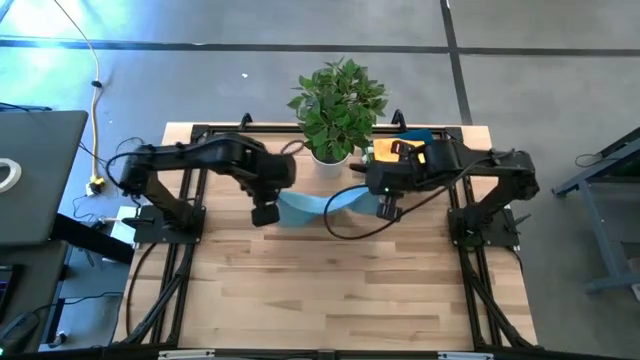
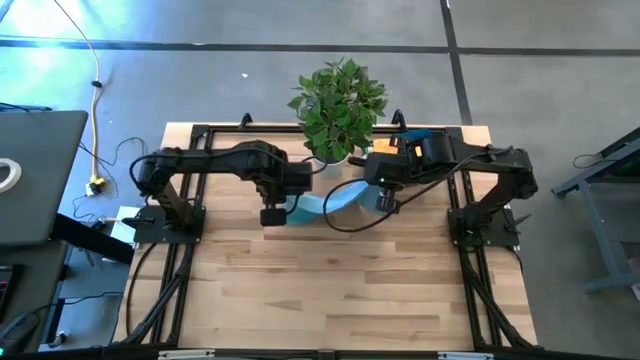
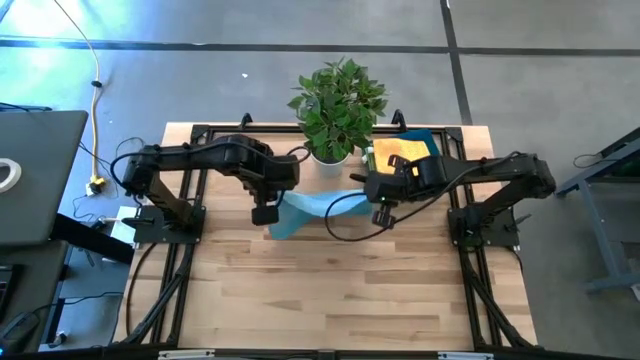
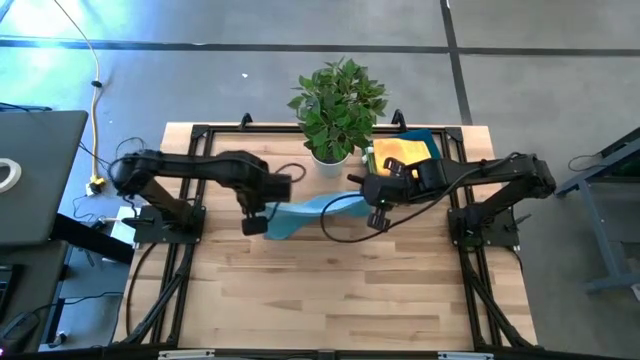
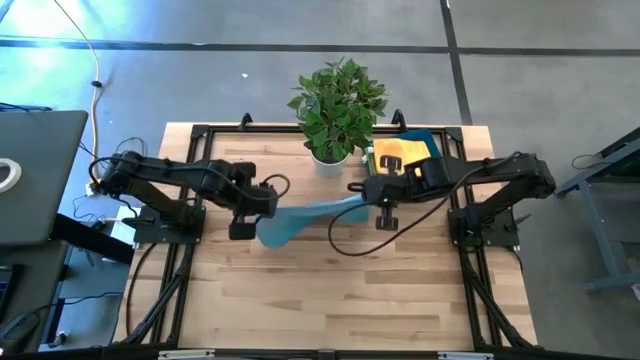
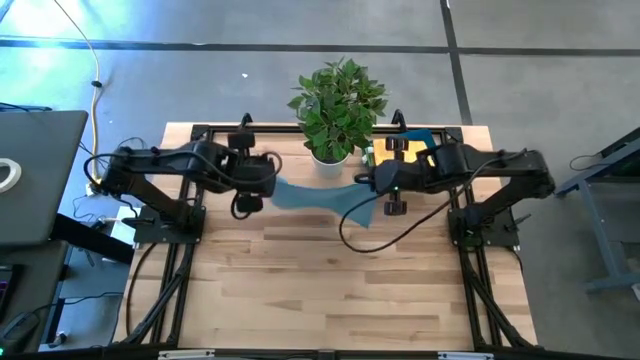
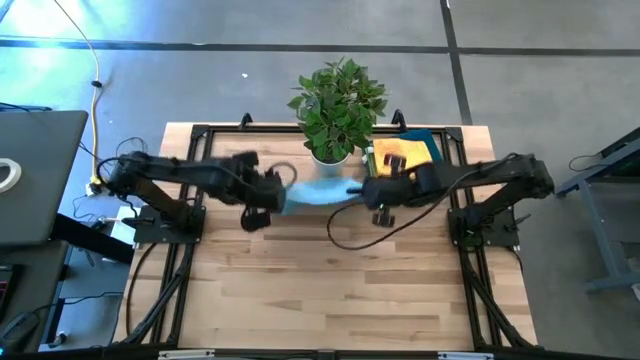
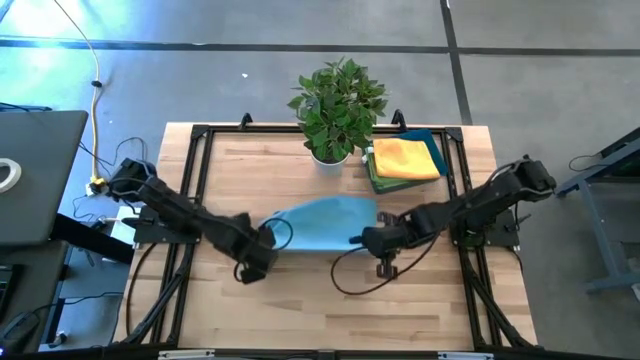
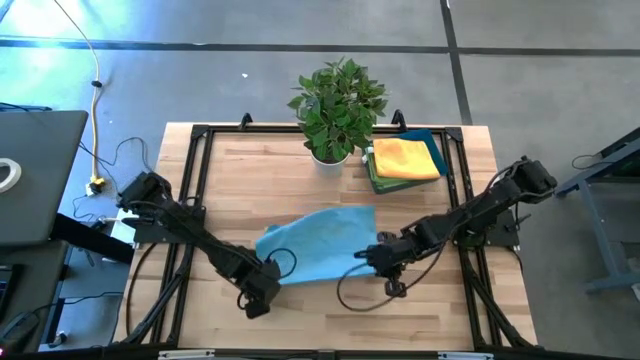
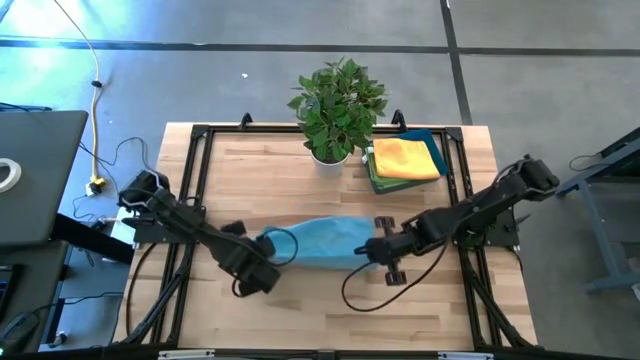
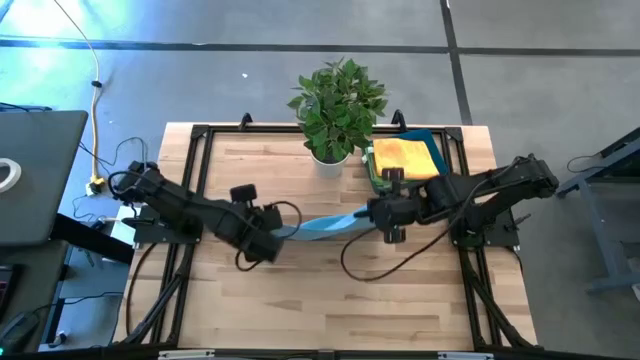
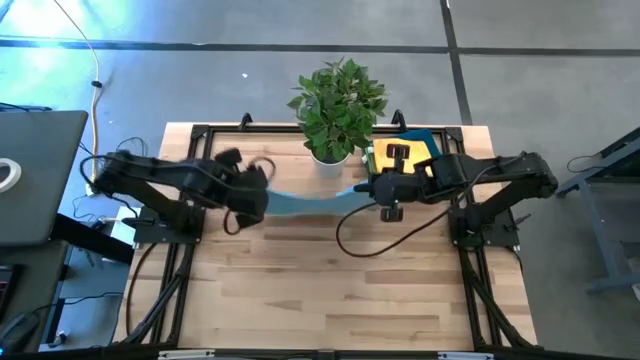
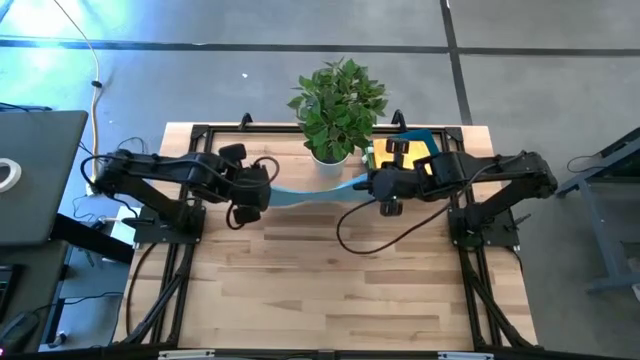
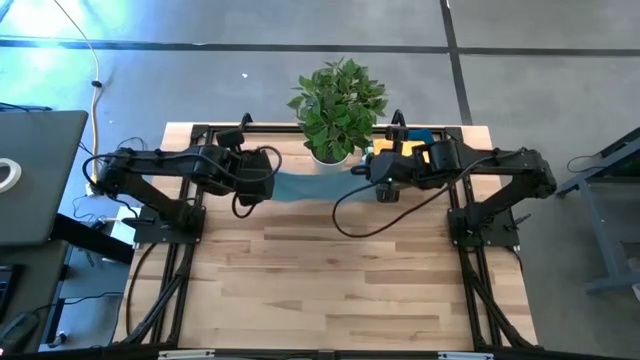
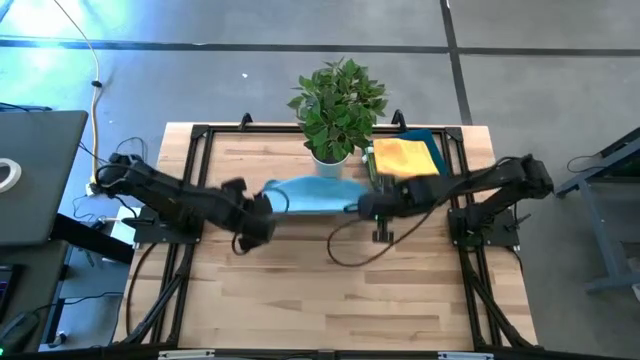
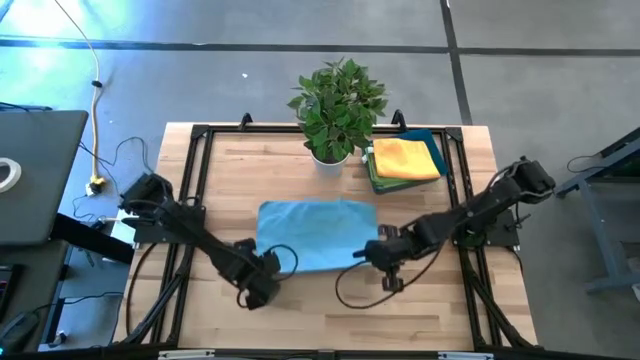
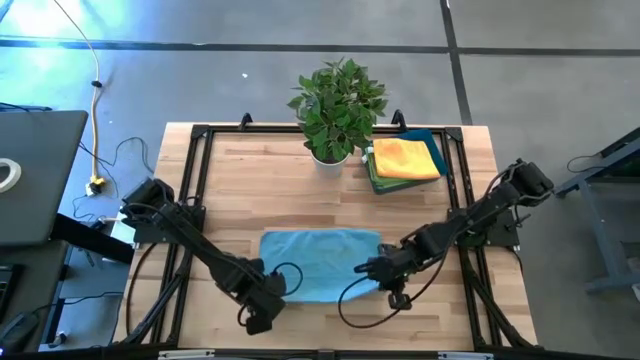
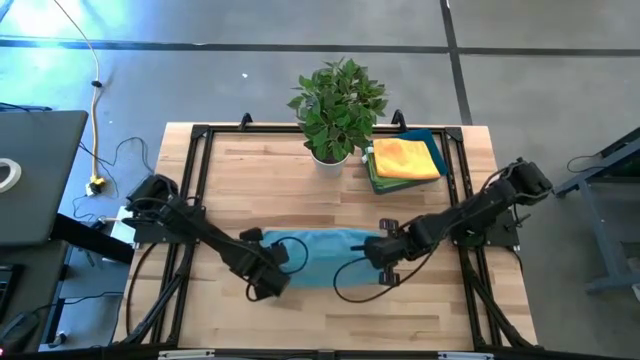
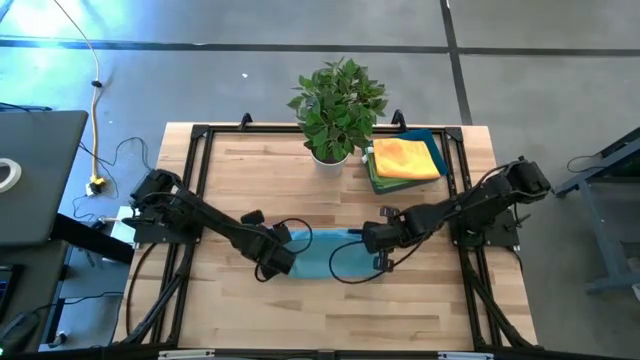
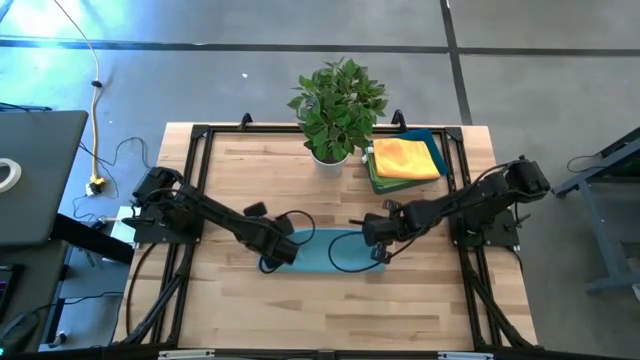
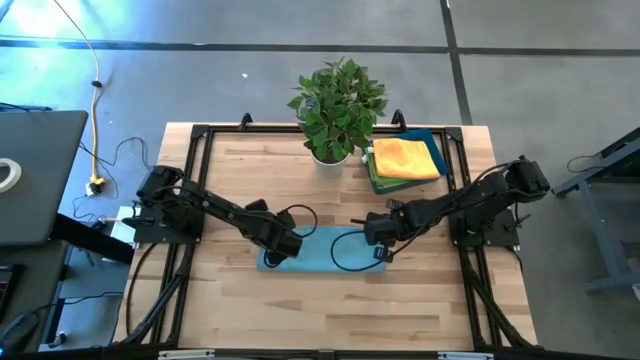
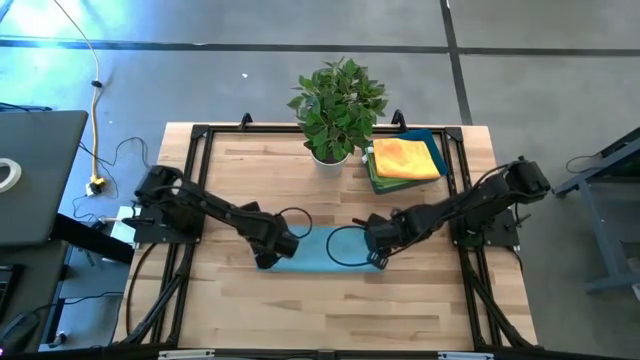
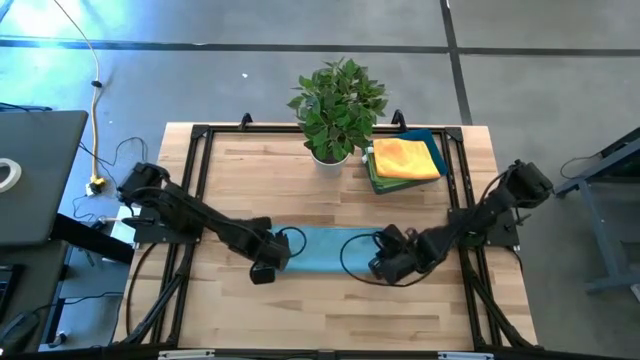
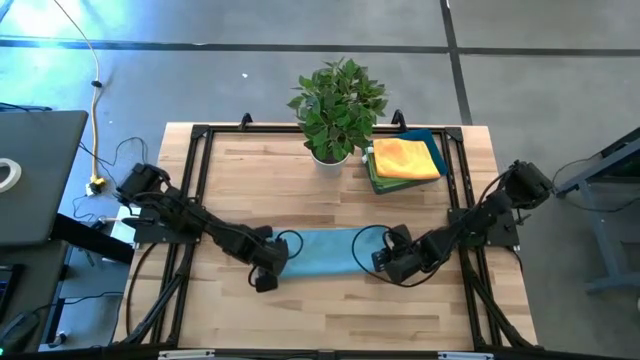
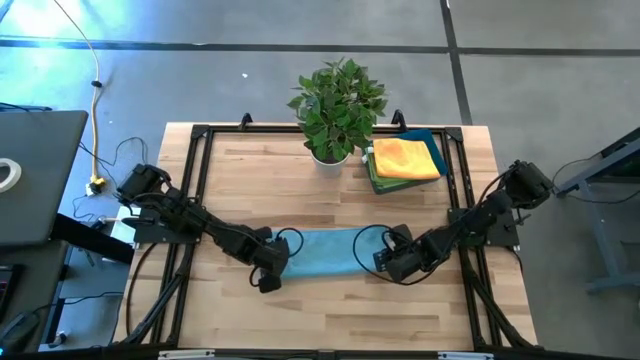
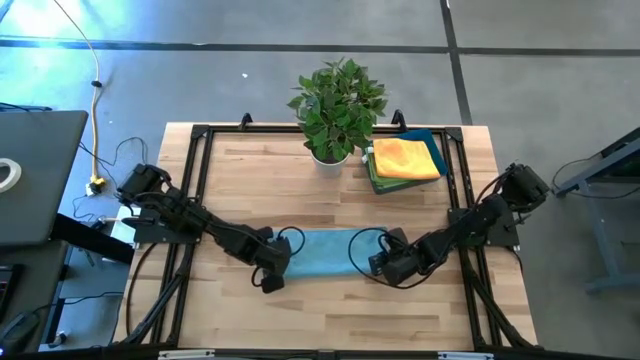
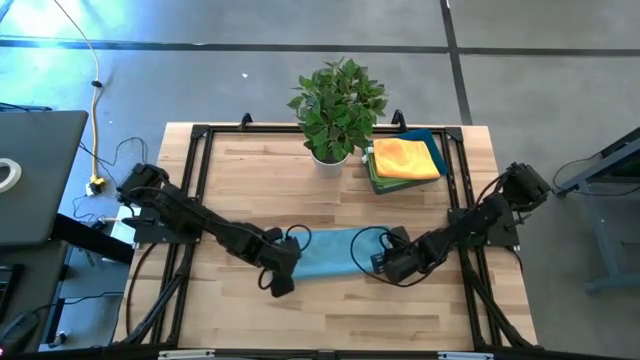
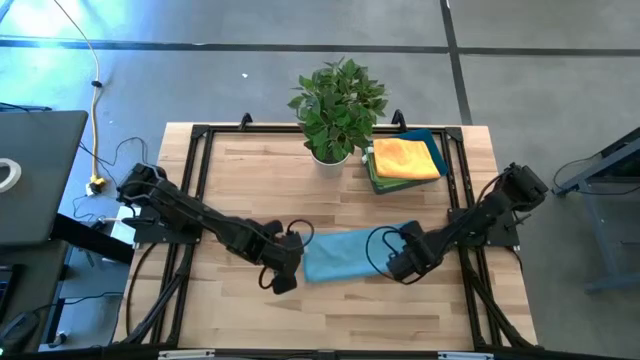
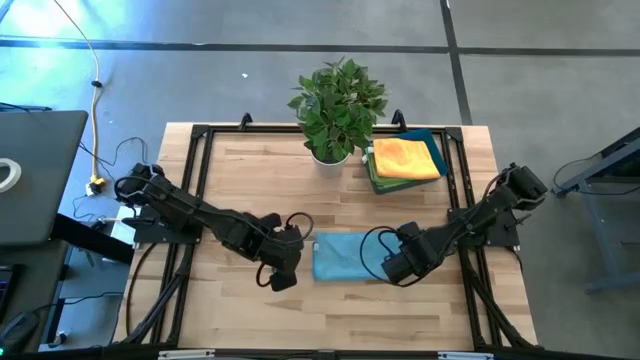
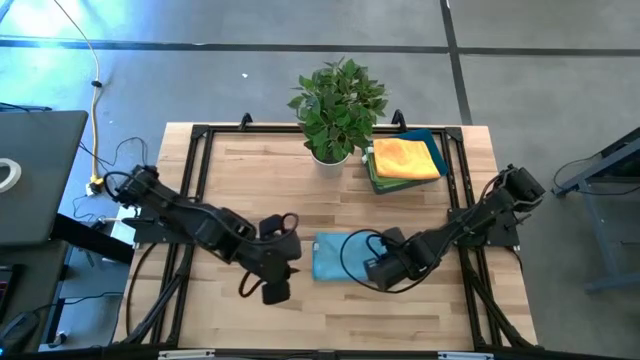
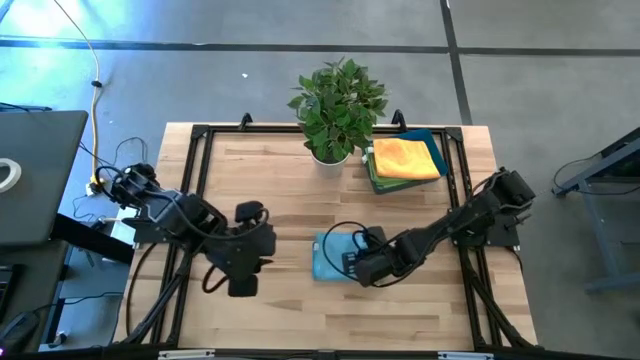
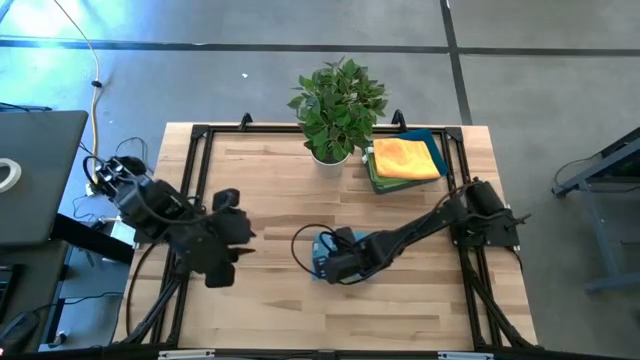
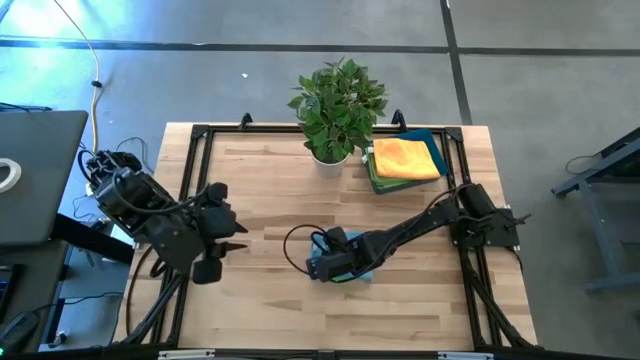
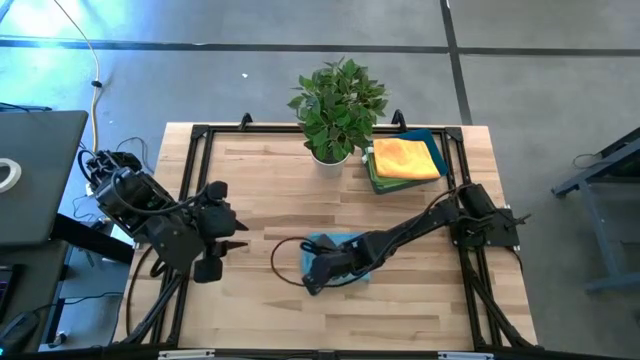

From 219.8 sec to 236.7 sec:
Task: Sort microfiber towel by color & place in baskets
Fold the blue towel

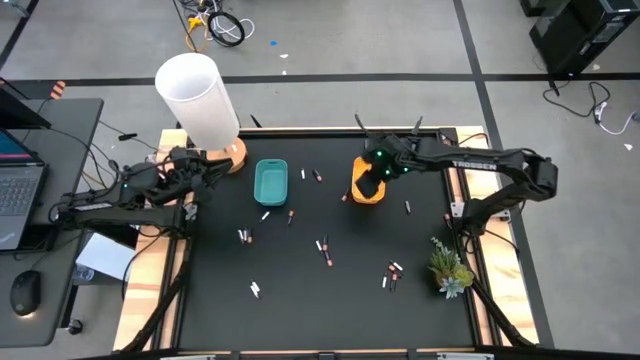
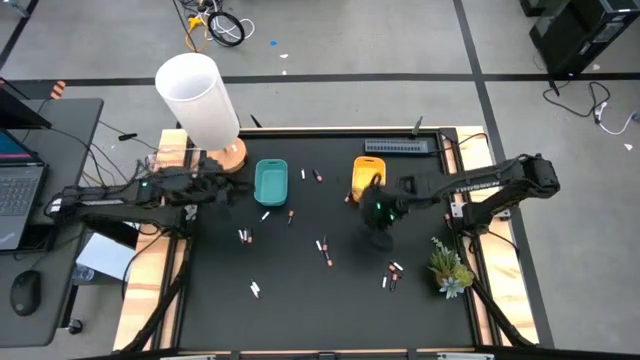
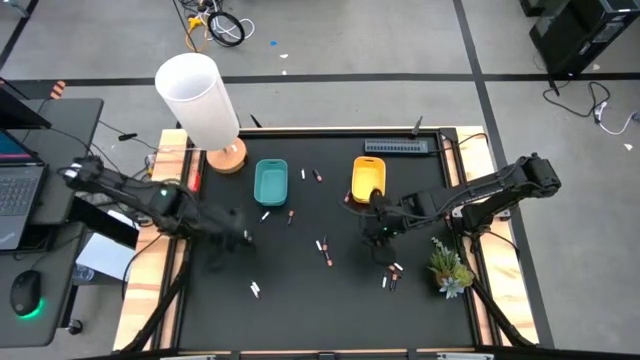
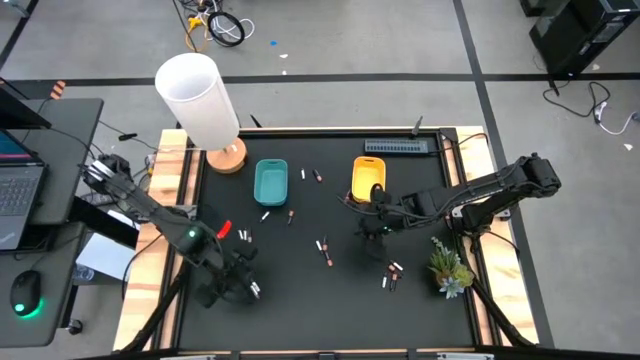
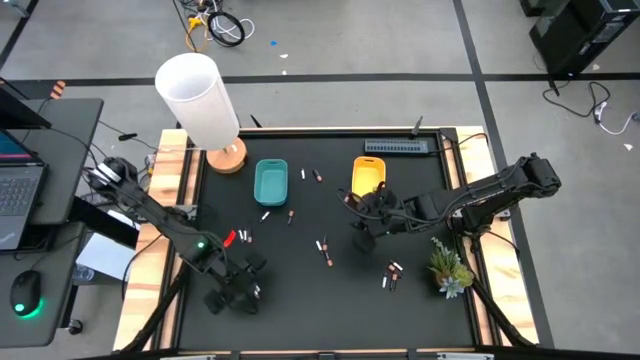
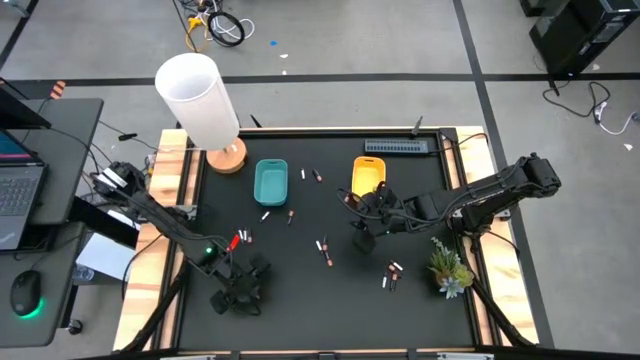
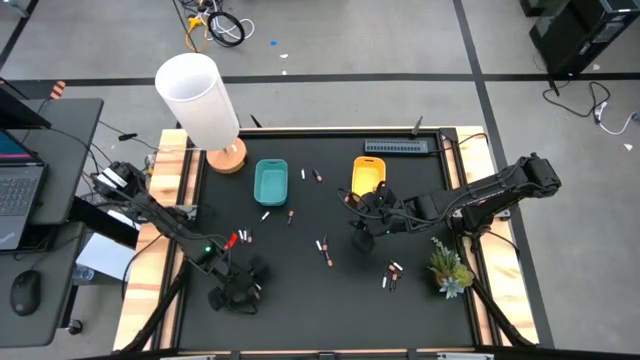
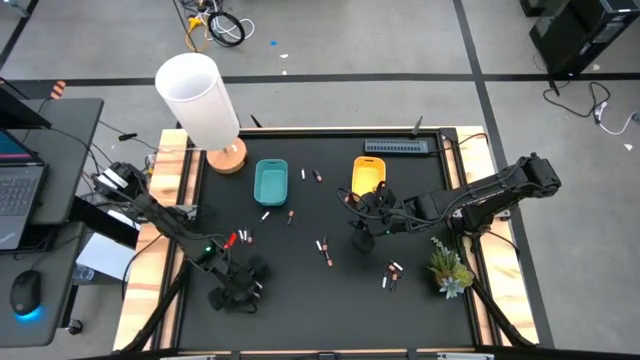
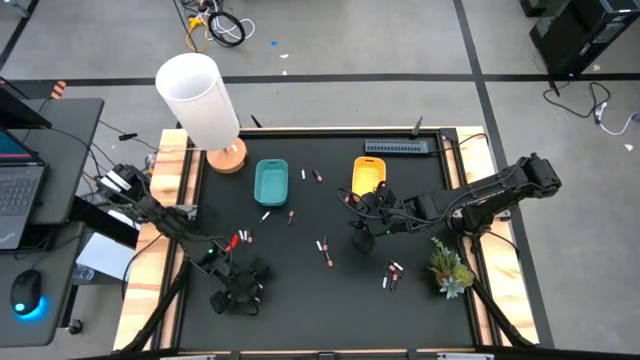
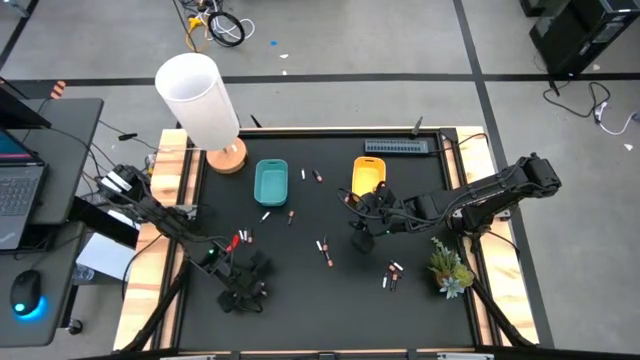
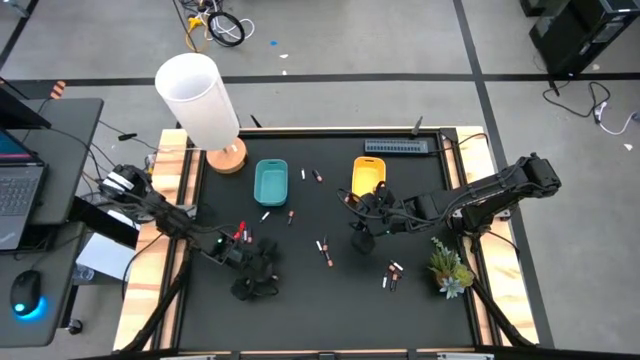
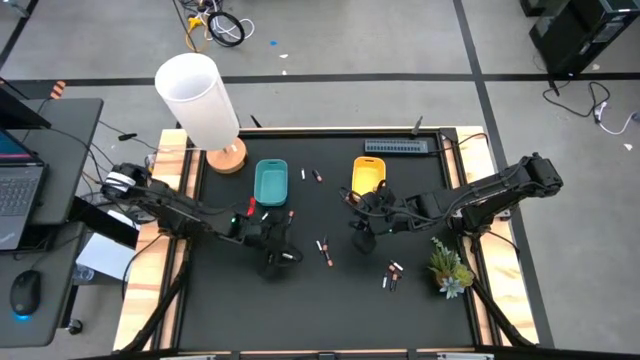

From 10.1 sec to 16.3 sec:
Task: Sort batteries
Put the silver battery into the blue bin
